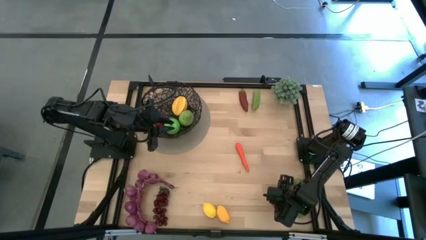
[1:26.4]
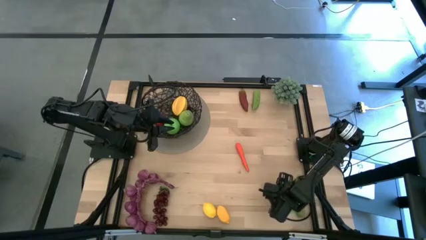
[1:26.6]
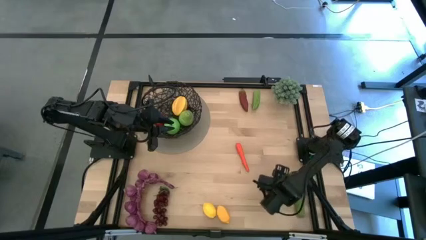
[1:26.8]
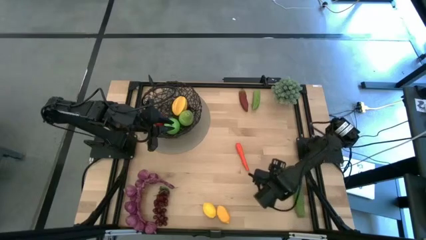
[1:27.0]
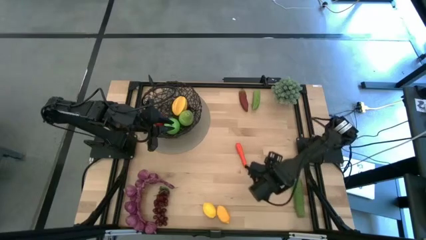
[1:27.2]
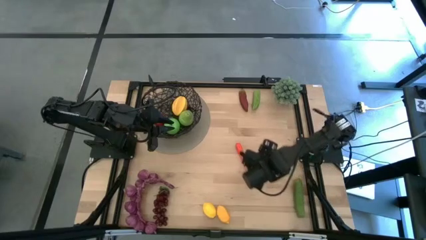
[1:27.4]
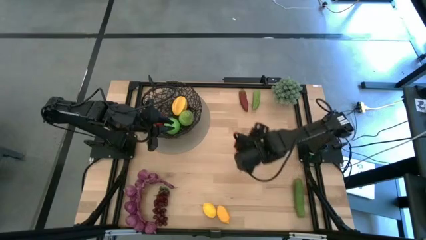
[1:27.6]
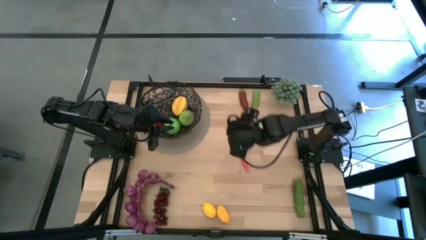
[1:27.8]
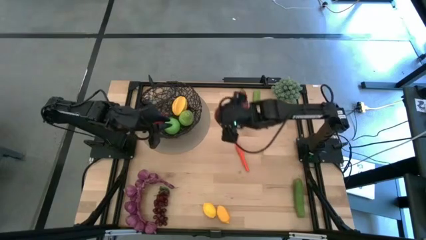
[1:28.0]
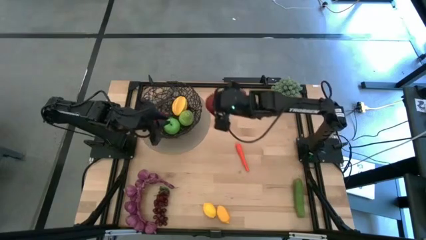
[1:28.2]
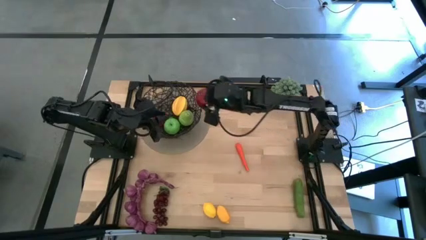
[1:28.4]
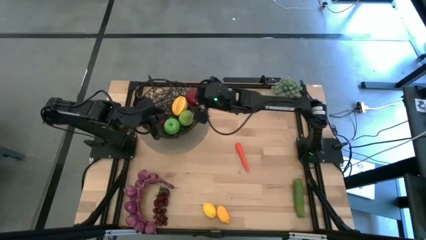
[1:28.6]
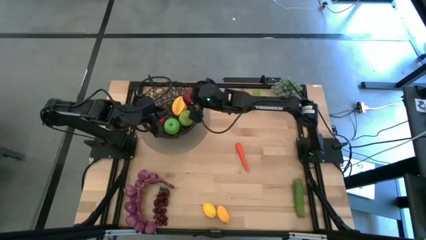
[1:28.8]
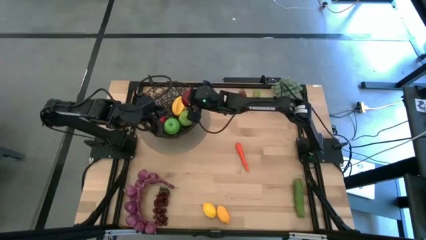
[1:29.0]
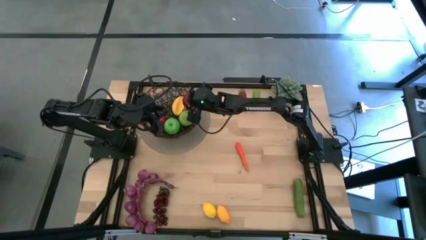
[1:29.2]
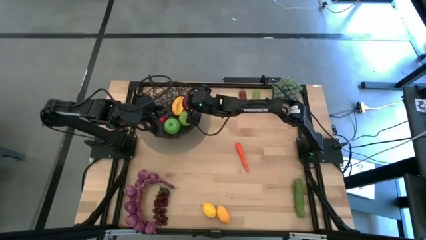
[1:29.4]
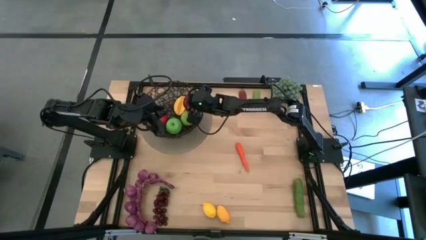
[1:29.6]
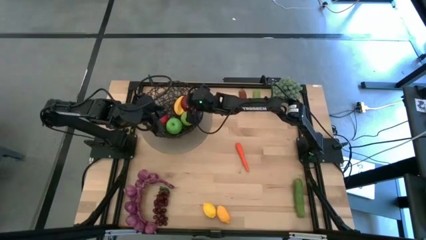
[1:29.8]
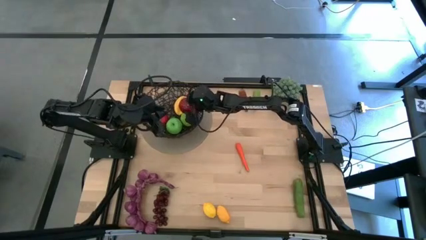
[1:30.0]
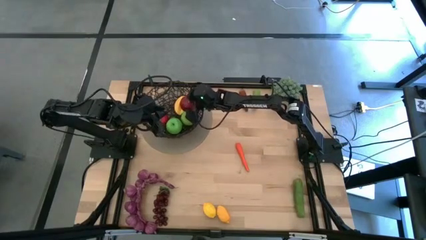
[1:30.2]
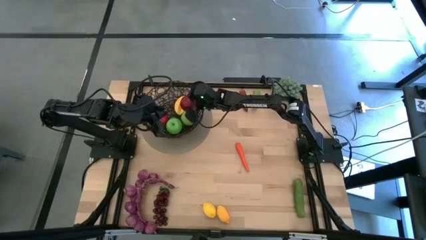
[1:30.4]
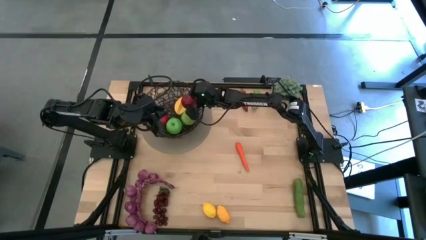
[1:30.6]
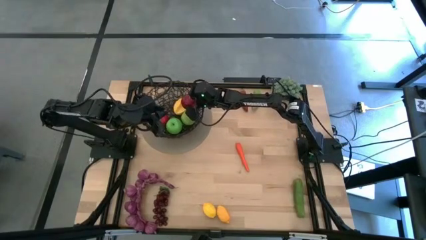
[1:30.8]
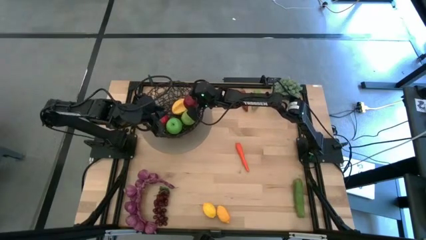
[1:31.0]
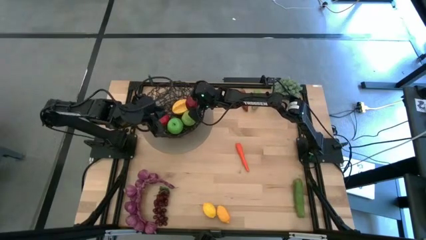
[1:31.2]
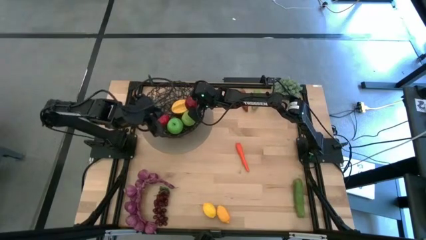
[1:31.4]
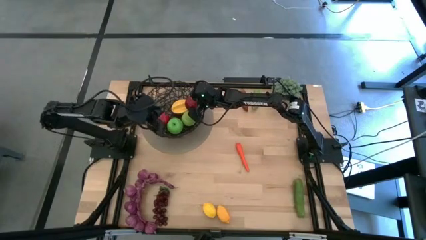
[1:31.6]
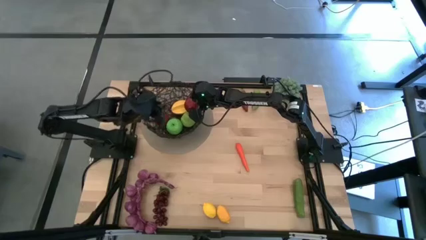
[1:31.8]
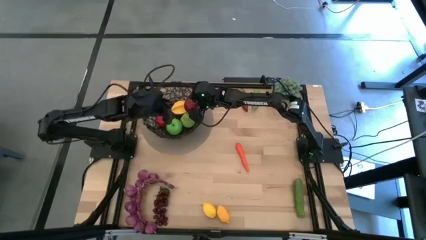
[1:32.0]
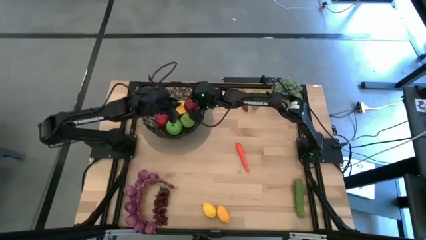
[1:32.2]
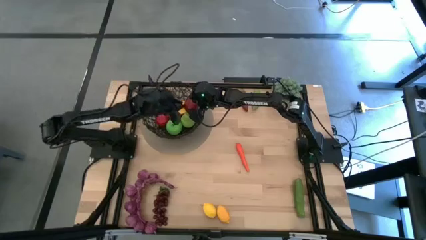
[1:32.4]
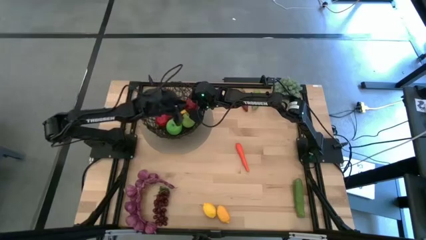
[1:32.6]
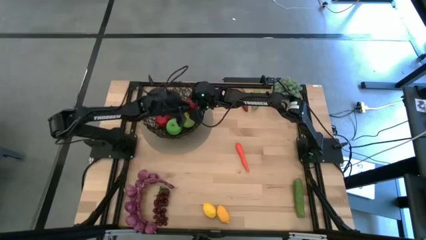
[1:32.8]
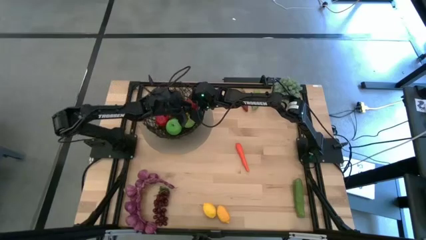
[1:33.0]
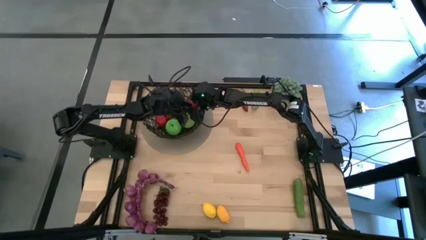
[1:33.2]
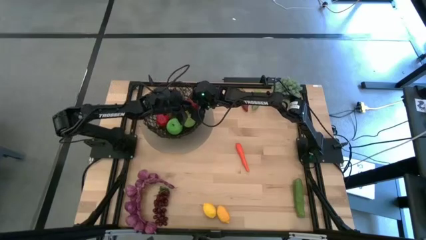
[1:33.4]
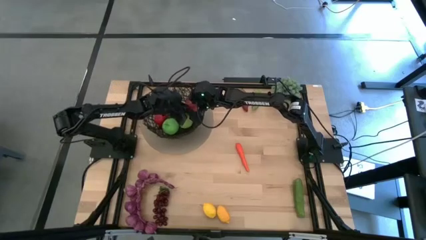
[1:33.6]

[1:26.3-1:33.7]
Task: Build produce basket
Put the red pomegranate into the black wire basket

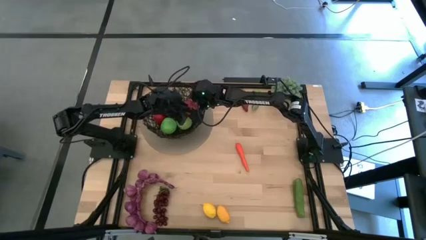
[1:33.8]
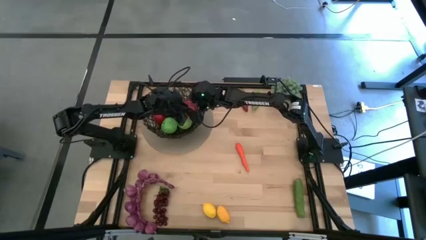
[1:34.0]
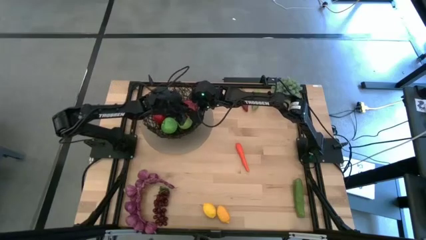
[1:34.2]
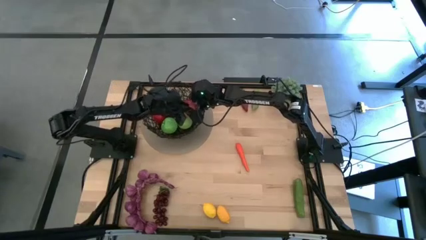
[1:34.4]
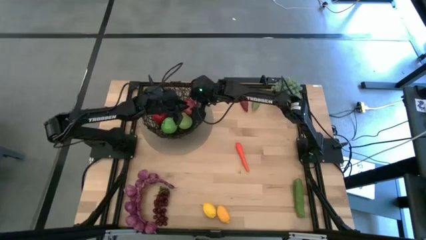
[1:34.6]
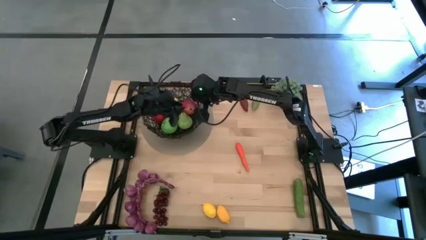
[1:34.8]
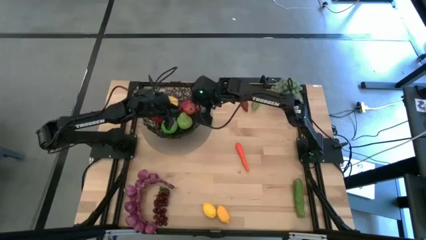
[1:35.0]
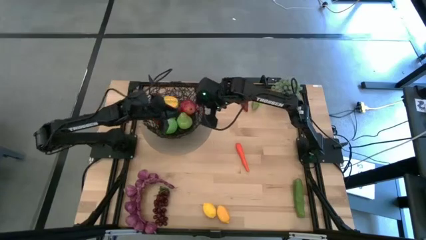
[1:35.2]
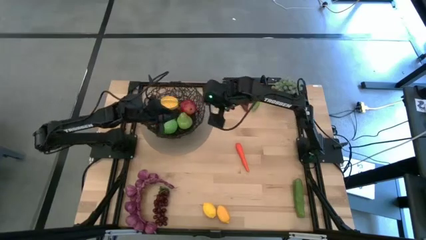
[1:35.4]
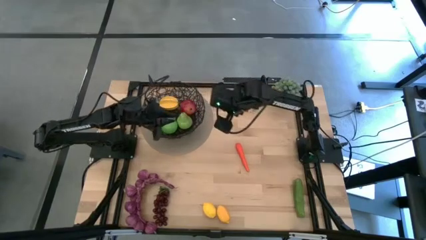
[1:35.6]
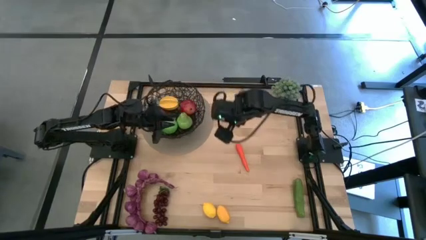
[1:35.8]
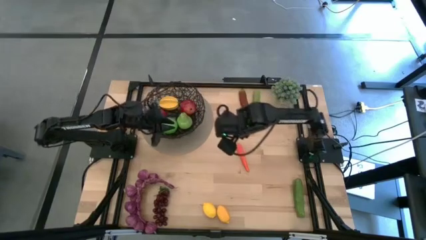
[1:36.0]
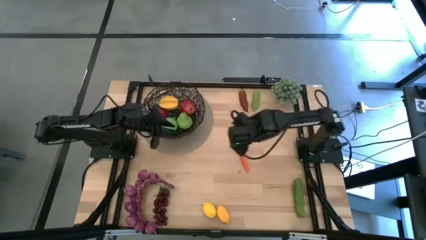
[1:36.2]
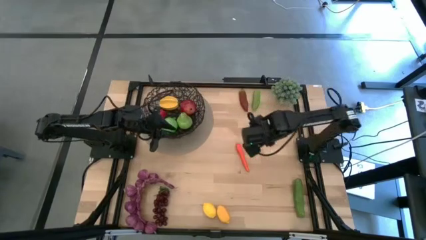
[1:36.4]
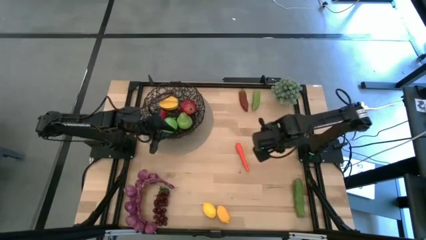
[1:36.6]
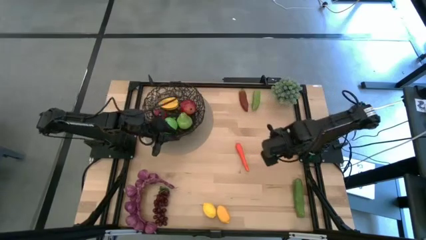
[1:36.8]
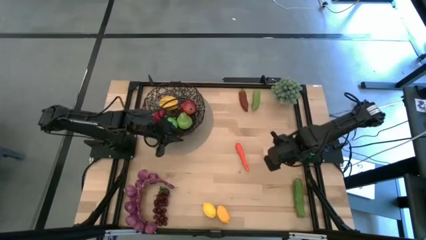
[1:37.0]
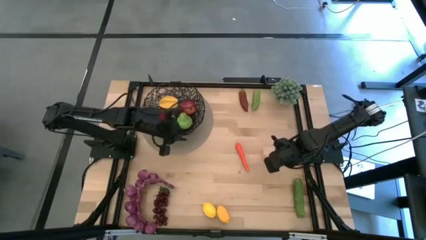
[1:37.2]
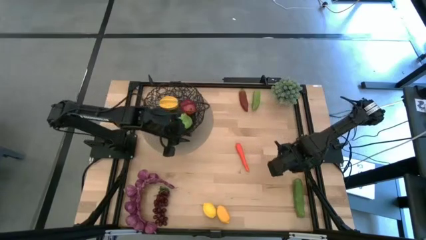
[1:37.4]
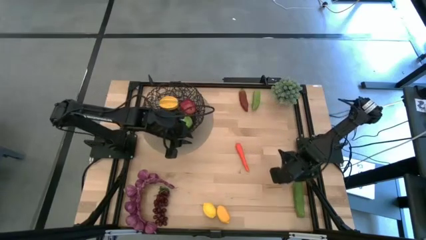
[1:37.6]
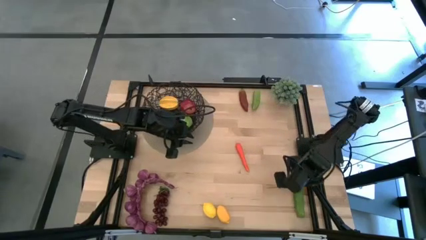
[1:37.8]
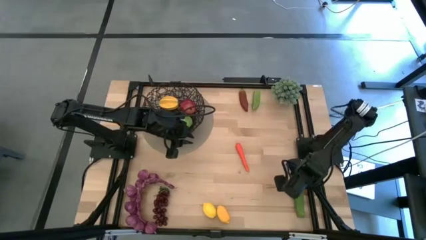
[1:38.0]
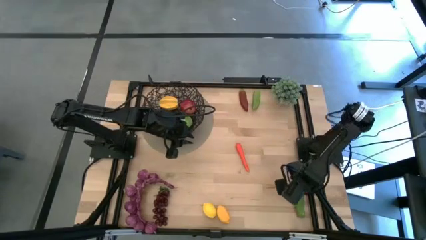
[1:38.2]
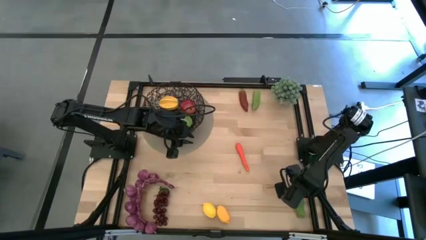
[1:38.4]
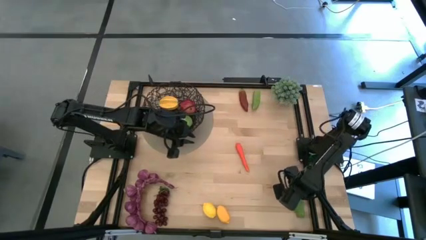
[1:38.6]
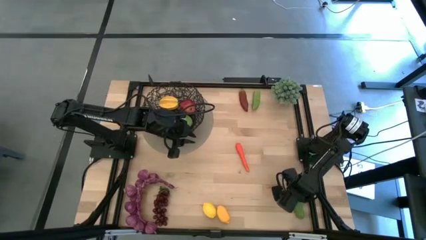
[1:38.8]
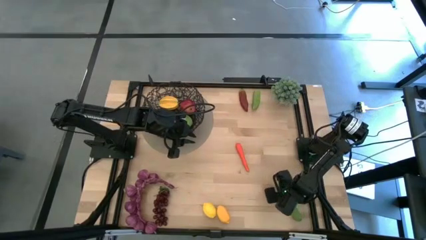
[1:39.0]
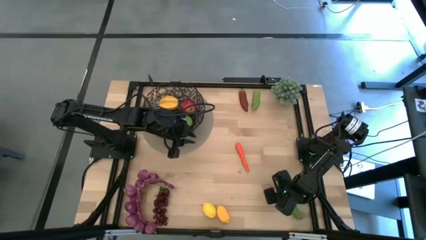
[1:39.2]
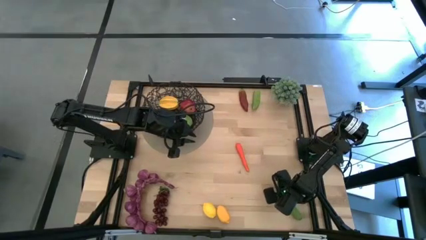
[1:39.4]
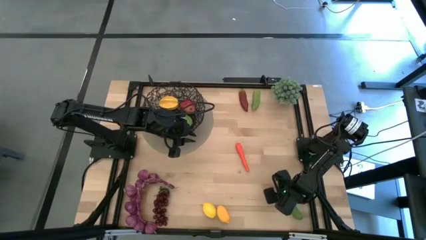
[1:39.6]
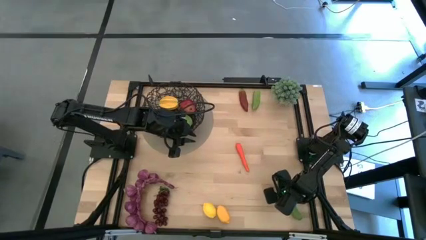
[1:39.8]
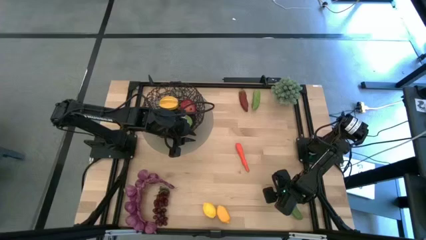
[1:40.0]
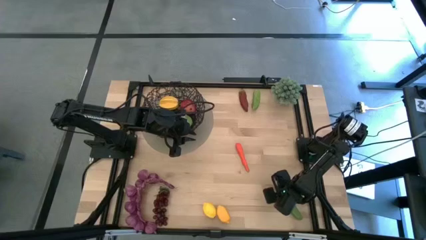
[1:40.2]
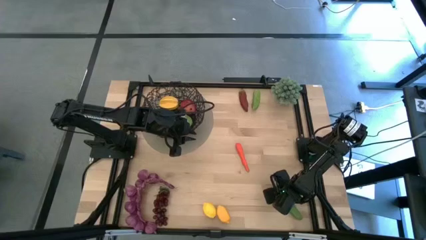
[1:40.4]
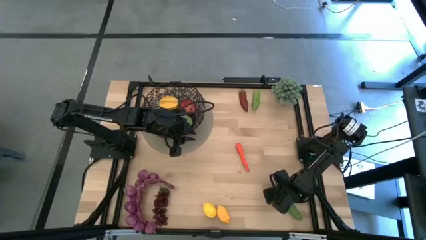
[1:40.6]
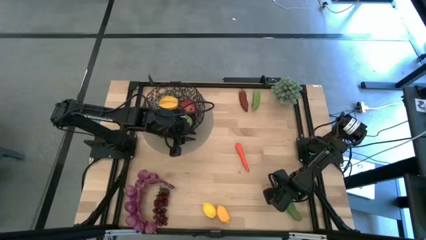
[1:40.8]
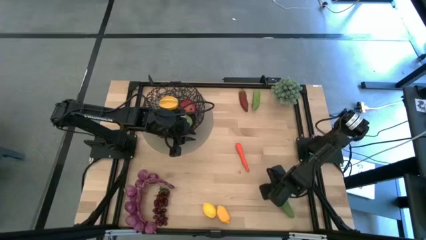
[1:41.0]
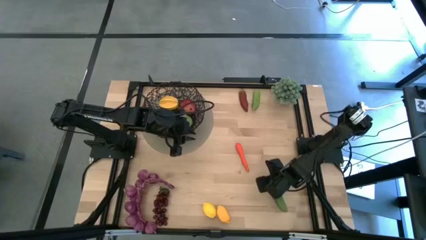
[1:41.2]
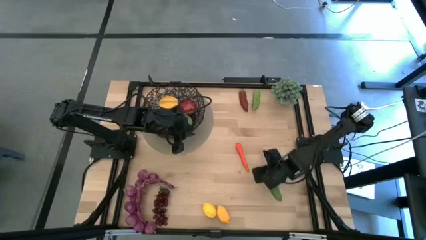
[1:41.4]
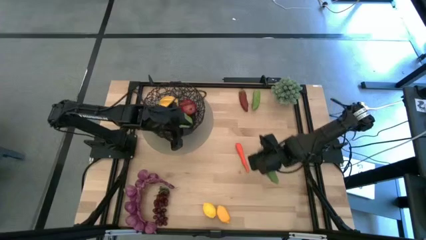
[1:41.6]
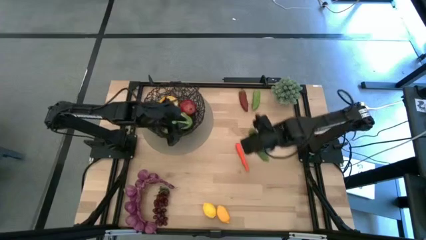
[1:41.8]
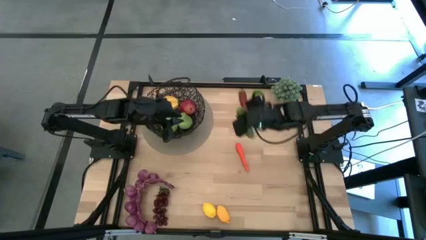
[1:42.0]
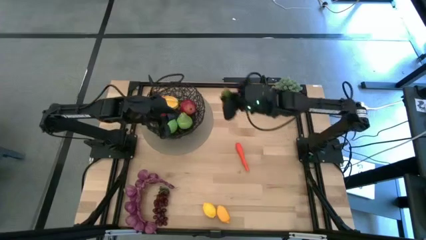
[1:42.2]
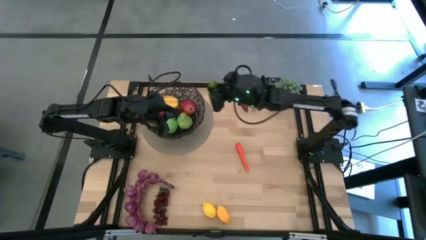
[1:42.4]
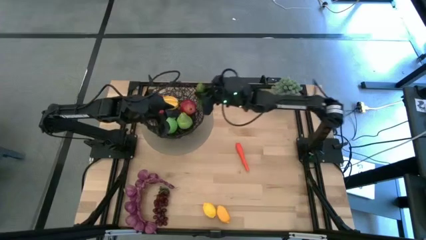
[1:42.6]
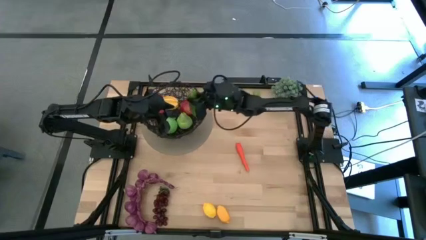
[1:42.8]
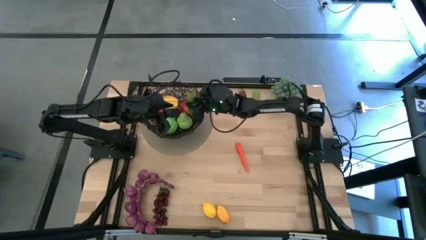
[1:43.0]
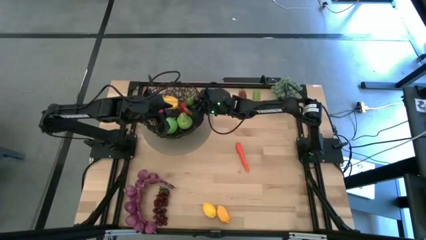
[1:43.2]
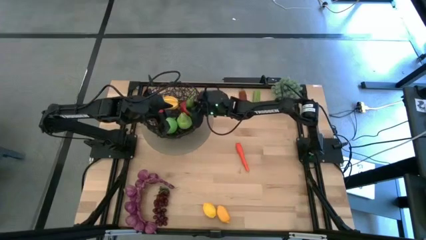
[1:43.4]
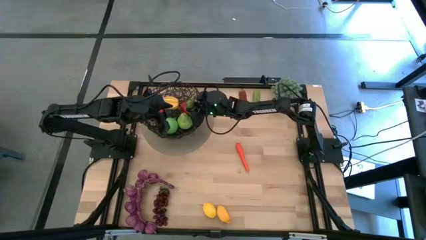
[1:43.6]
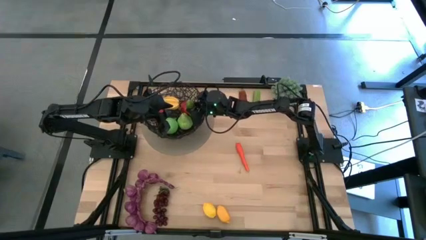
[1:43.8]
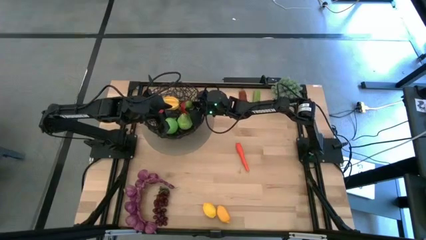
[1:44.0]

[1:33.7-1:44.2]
Put the bottom green cucumber into the black wire basket
